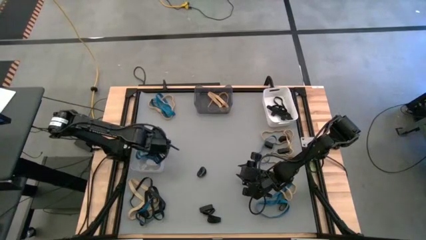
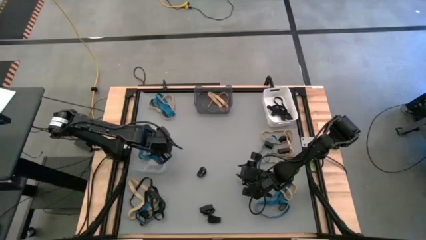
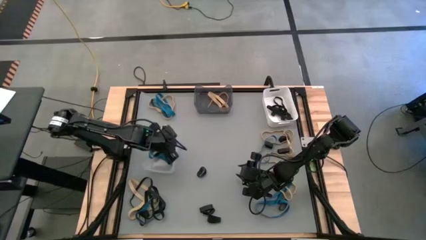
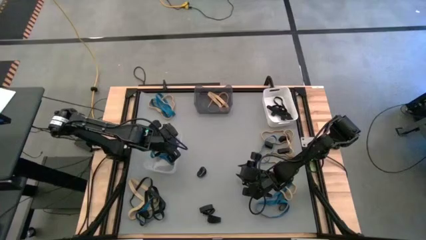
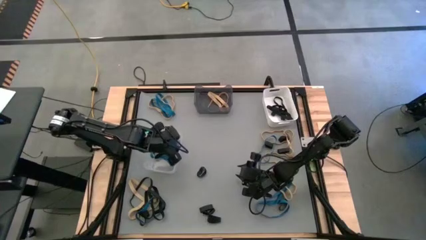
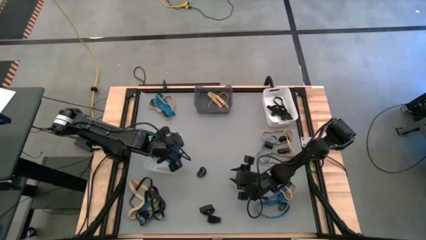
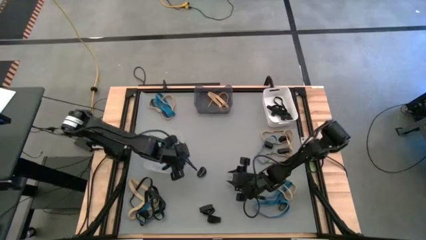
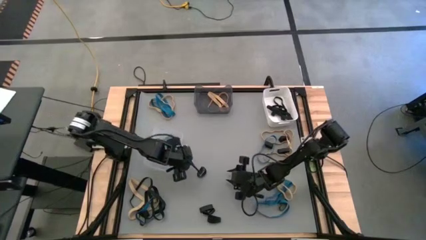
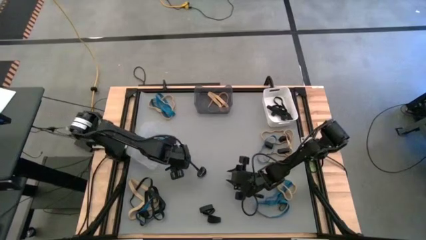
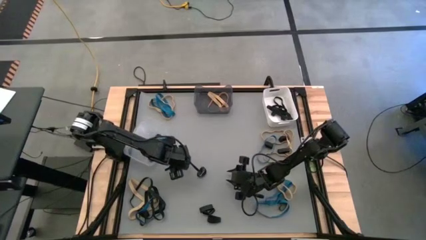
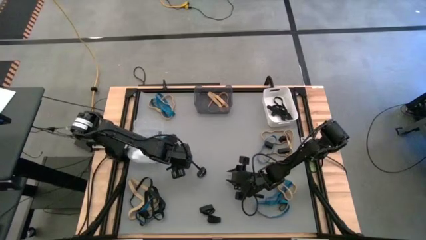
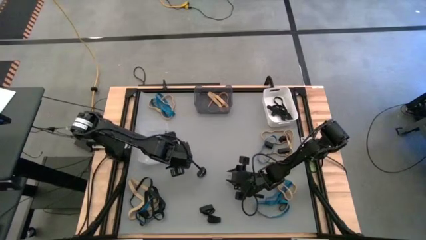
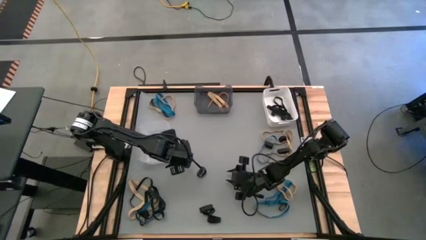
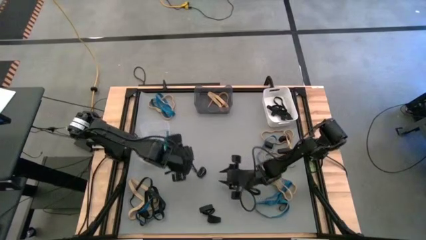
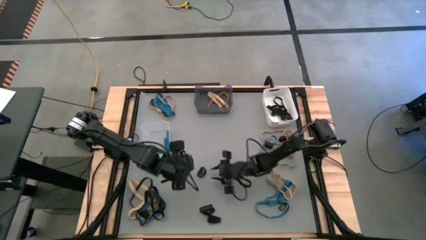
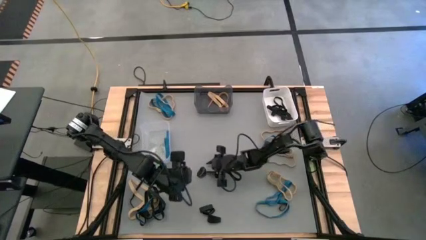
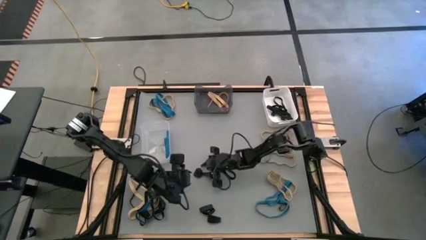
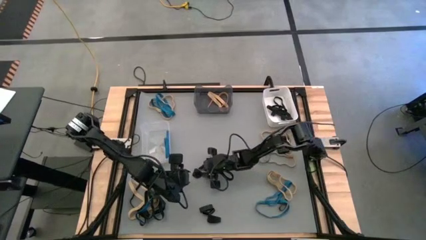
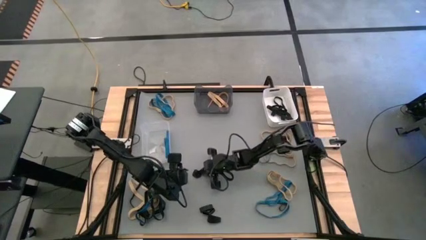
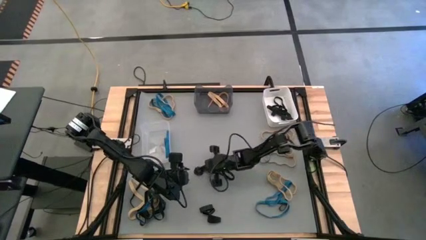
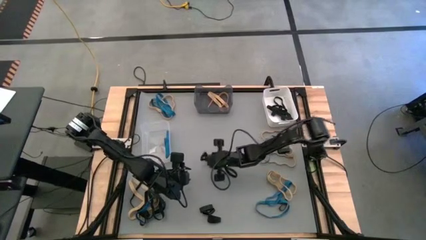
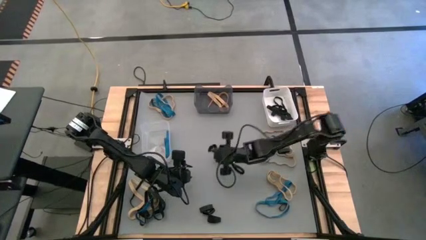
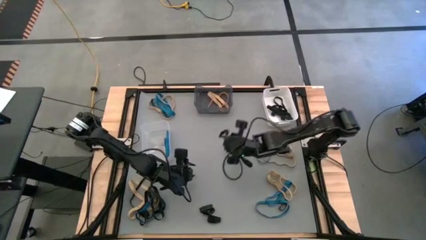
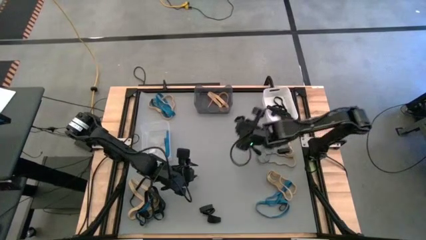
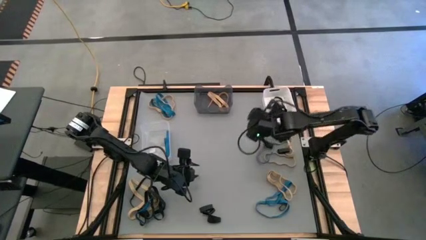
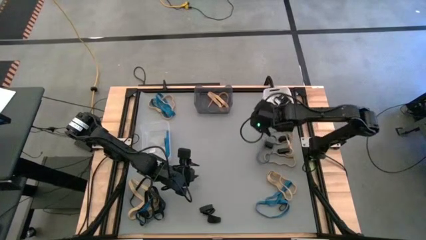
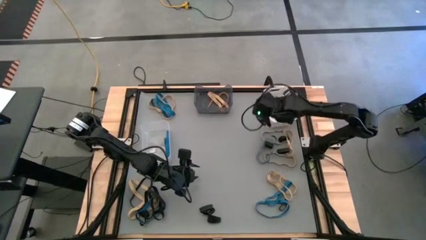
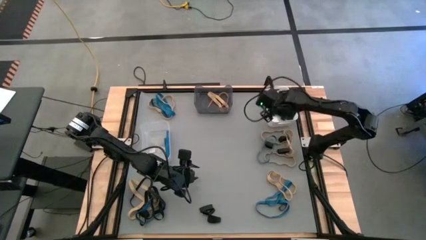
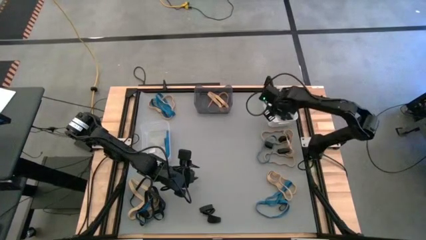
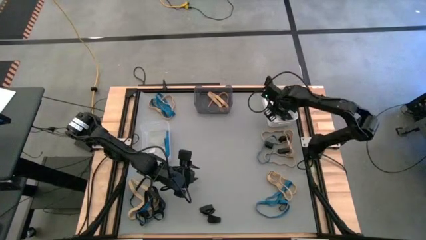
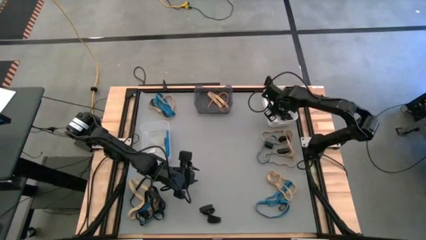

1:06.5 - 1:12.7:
Task: Sort rubber bands into baskets
Put the black rubber band into the white bin

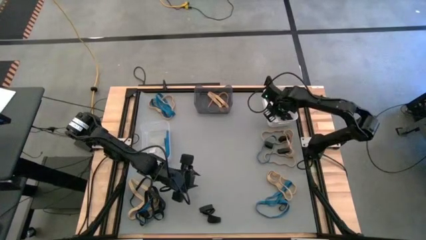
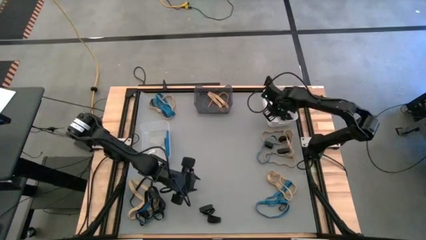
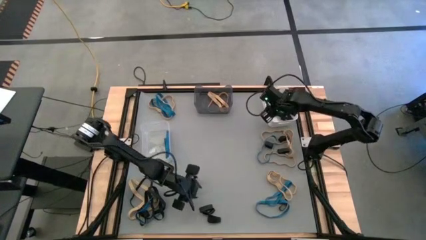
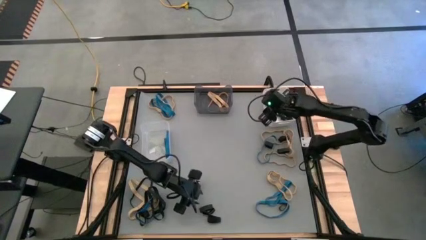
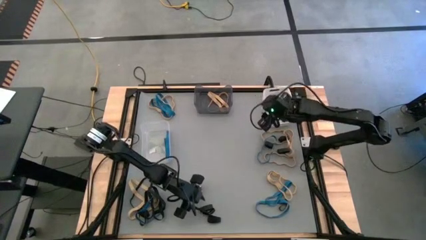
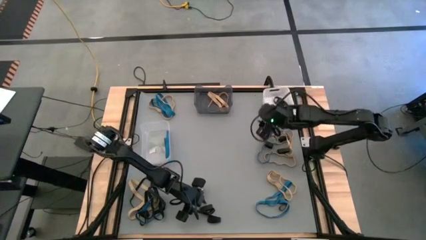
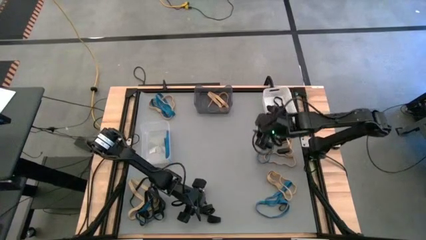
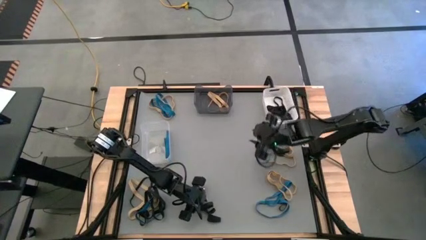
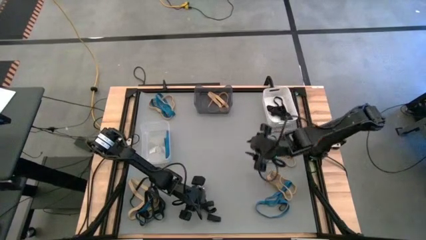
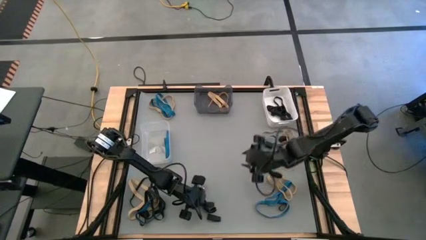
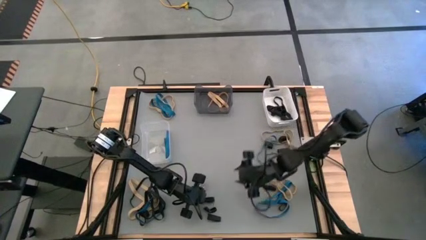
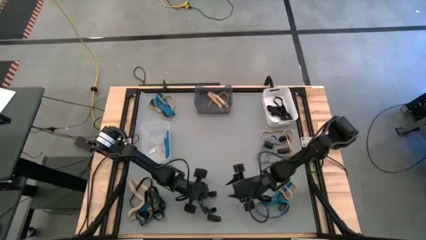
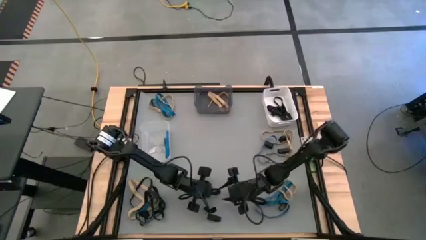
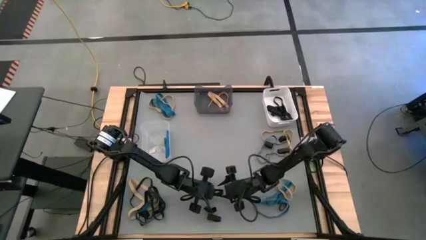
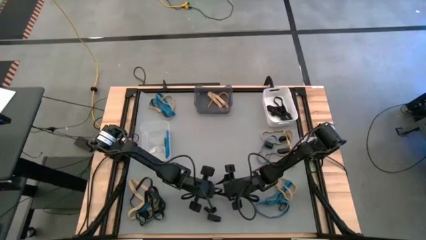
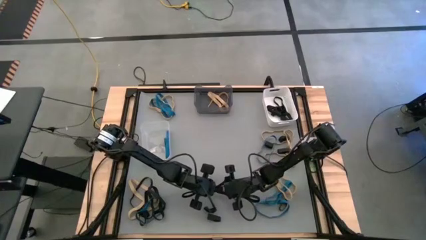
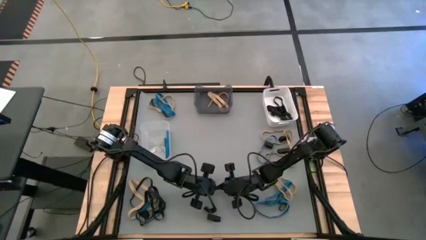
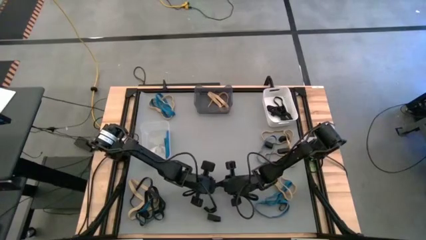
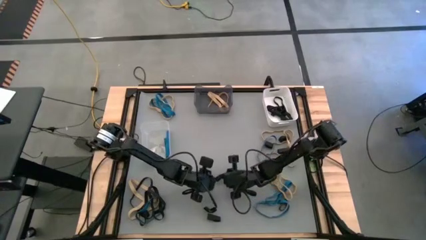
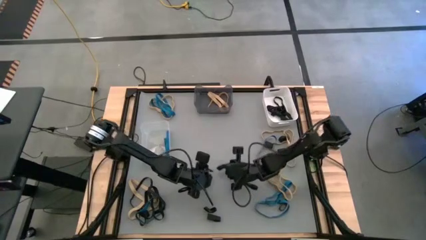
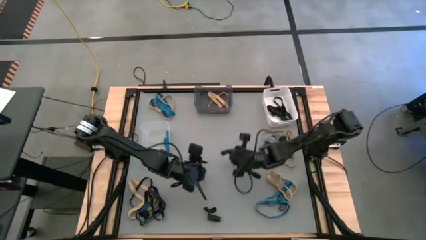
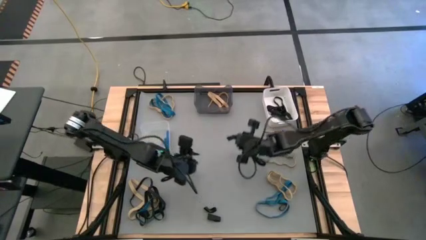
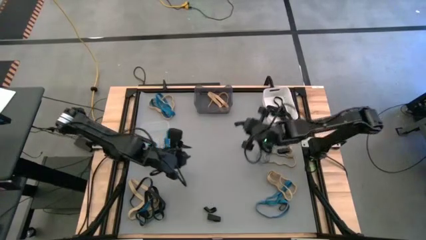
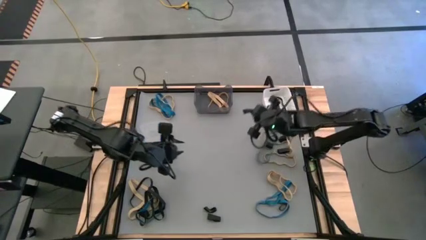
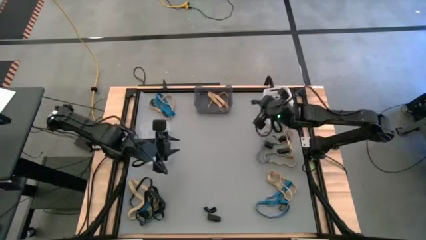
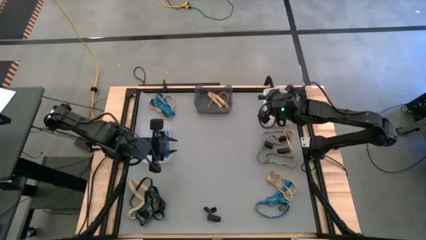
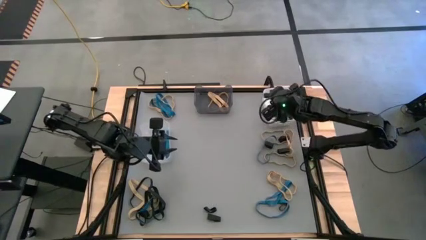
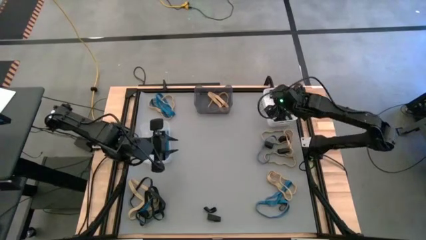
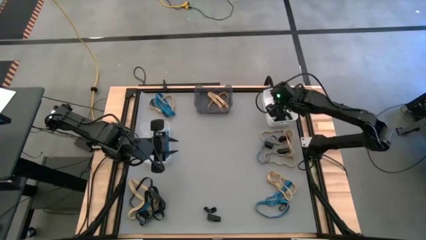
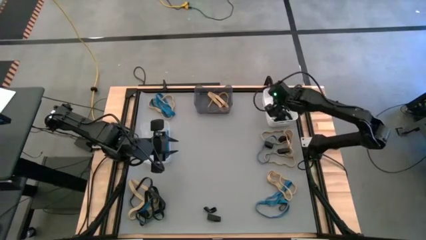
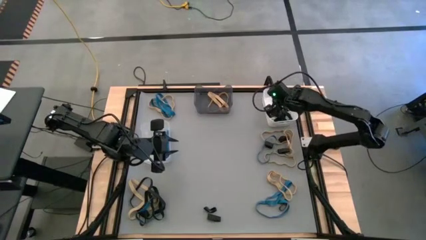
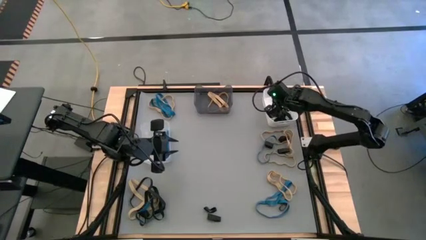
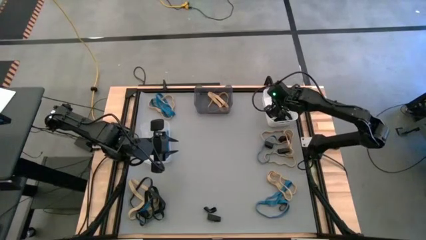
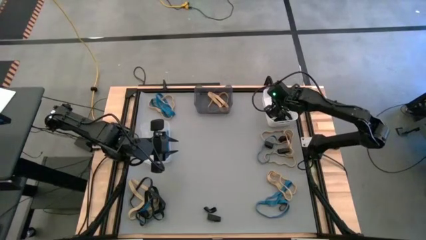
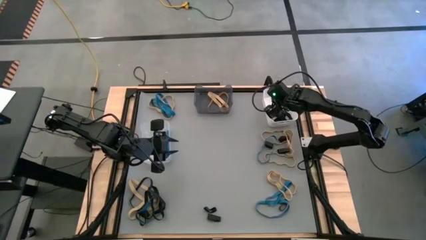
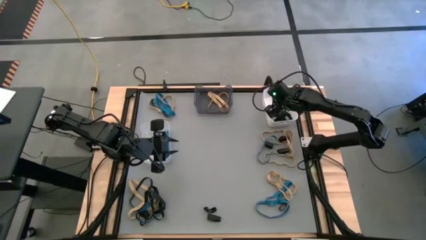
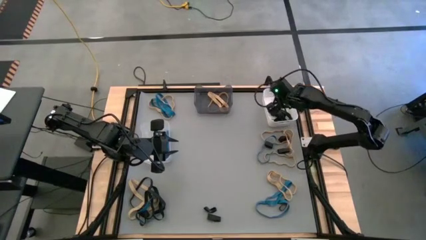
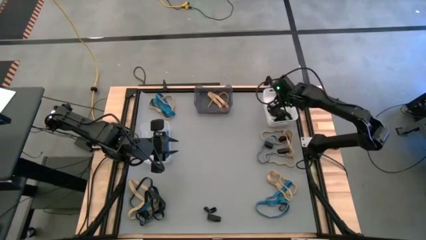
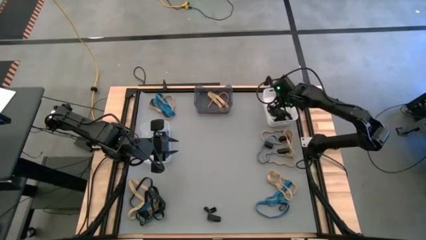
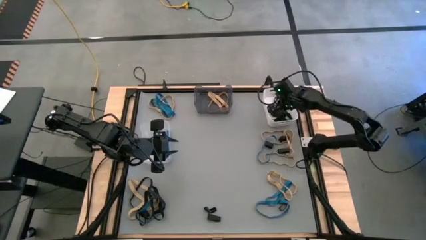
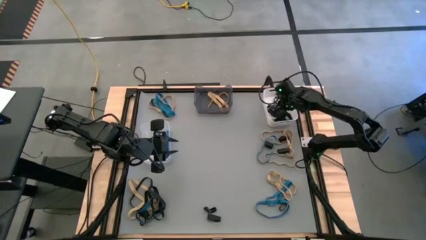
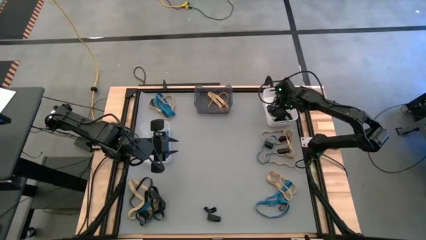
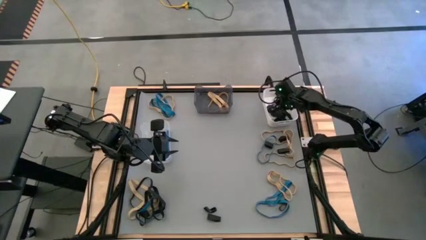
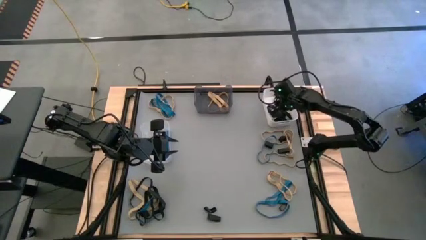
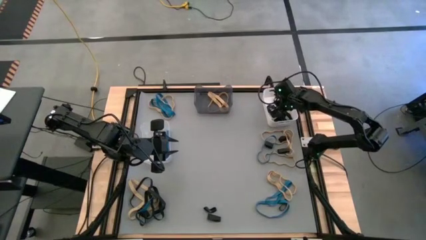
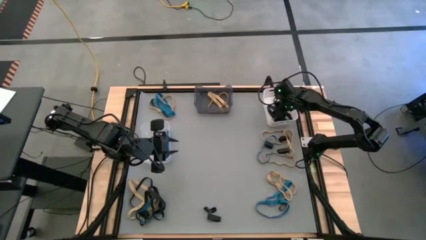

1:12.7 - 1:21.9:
Put the black rubber band into the white bin
